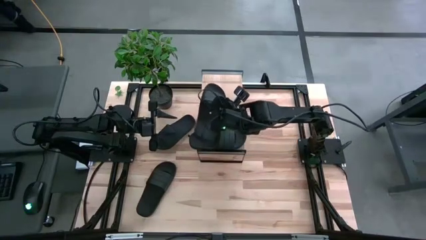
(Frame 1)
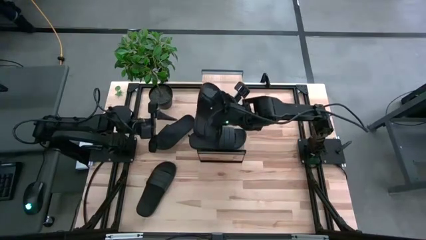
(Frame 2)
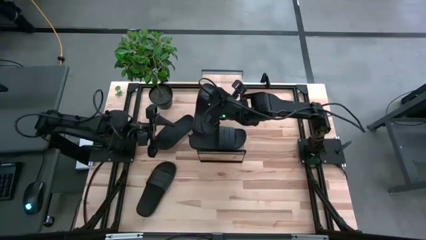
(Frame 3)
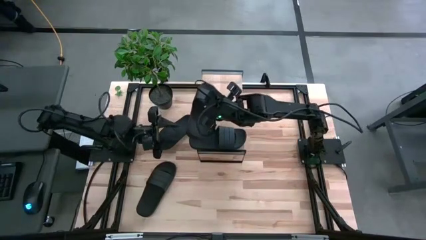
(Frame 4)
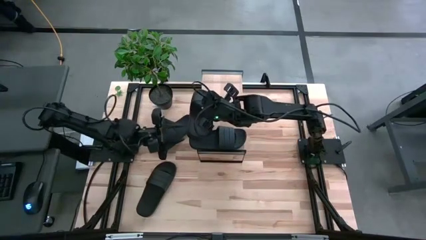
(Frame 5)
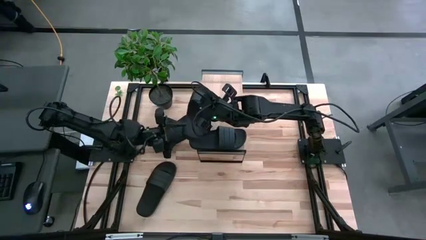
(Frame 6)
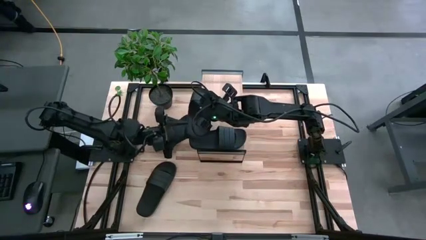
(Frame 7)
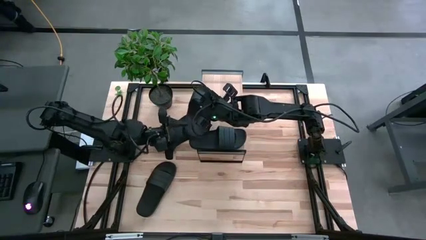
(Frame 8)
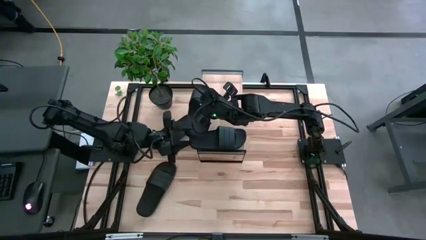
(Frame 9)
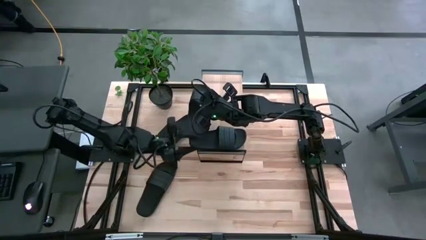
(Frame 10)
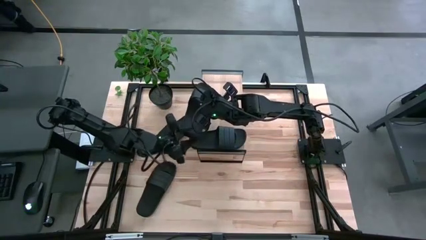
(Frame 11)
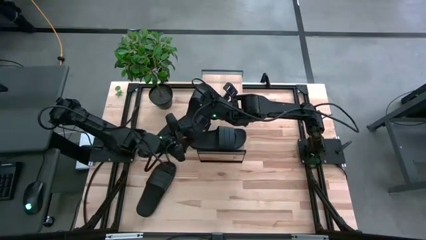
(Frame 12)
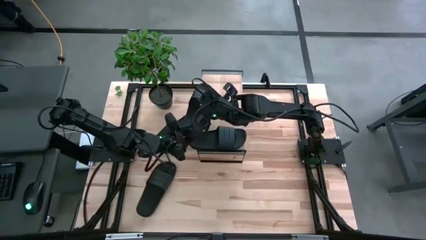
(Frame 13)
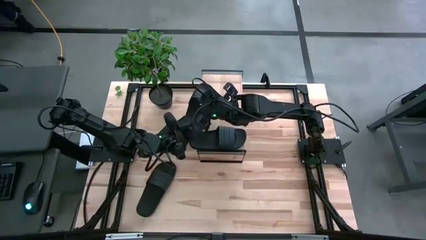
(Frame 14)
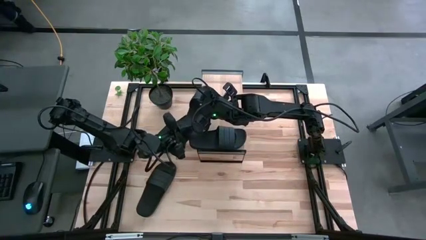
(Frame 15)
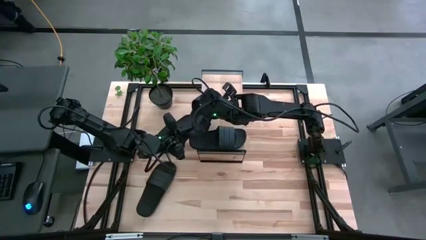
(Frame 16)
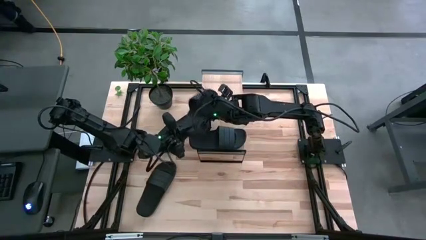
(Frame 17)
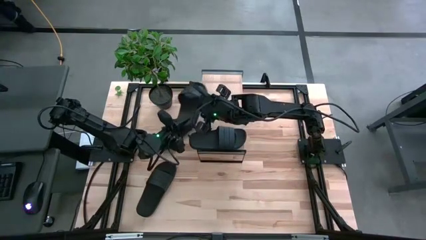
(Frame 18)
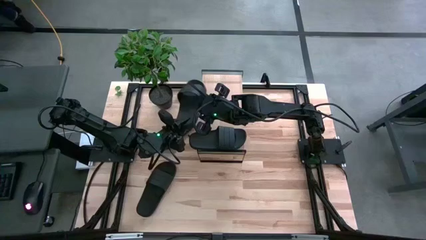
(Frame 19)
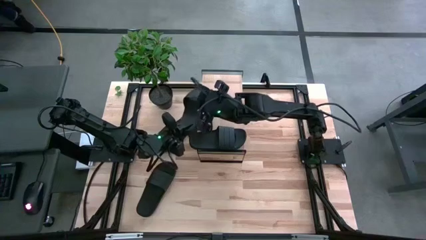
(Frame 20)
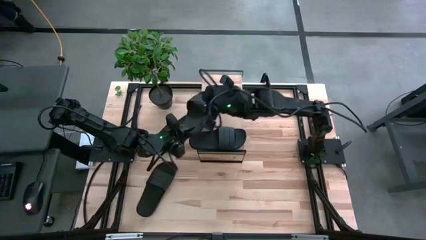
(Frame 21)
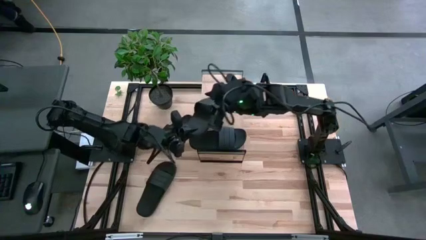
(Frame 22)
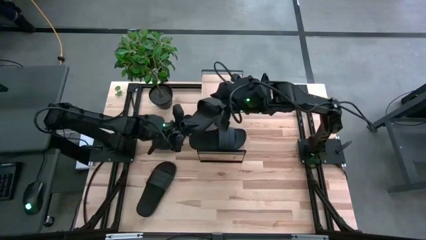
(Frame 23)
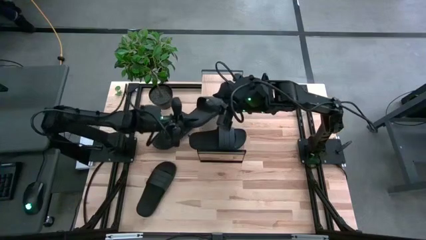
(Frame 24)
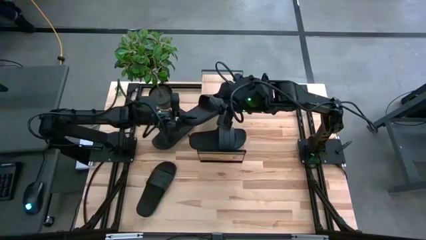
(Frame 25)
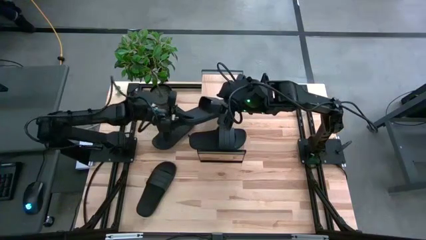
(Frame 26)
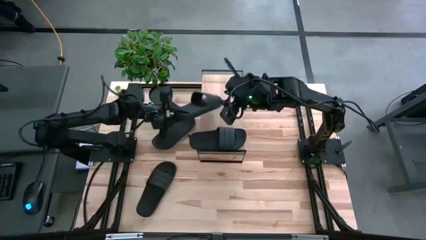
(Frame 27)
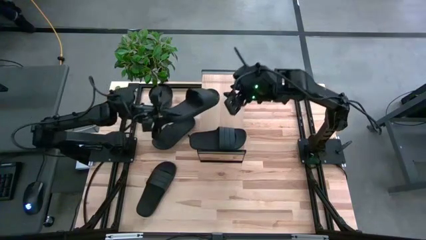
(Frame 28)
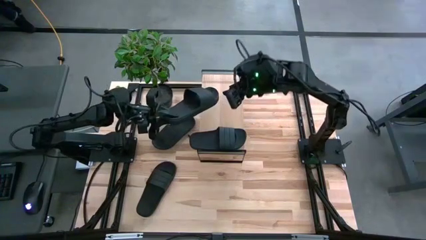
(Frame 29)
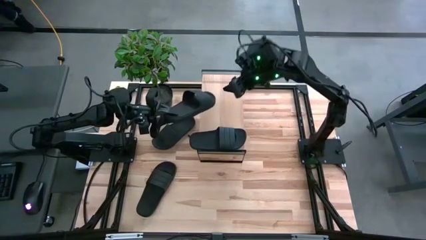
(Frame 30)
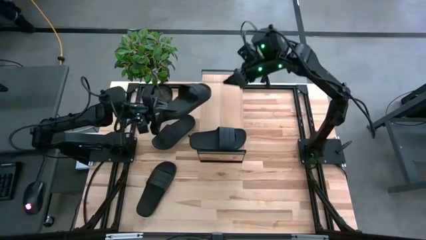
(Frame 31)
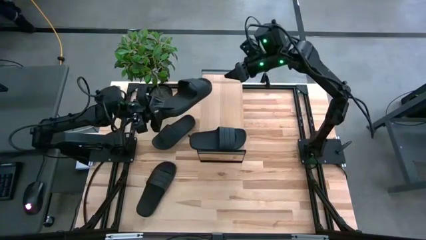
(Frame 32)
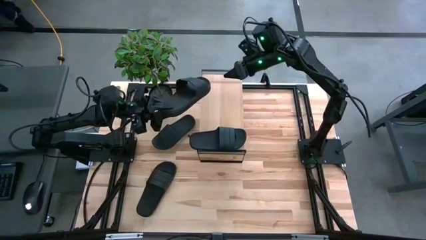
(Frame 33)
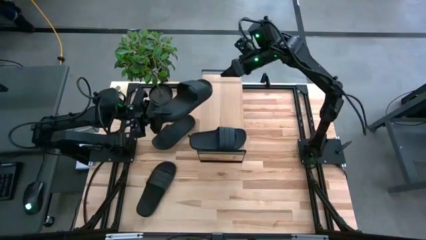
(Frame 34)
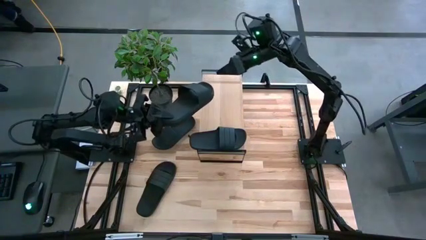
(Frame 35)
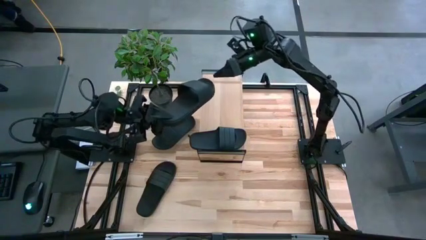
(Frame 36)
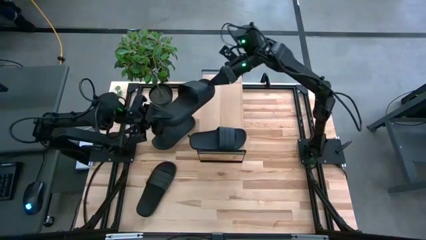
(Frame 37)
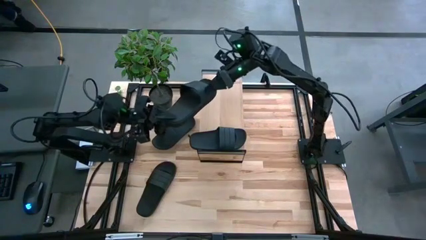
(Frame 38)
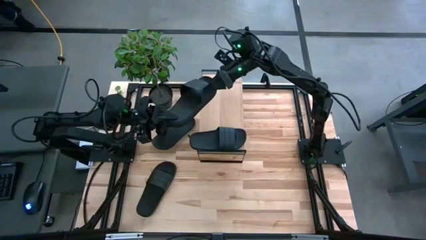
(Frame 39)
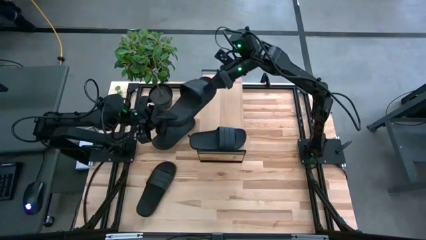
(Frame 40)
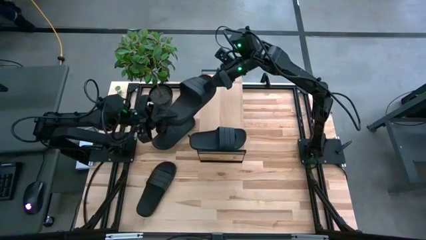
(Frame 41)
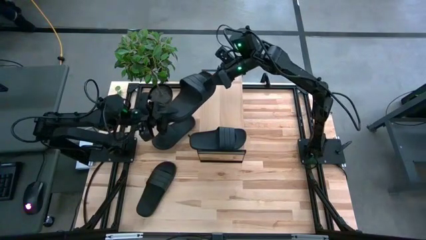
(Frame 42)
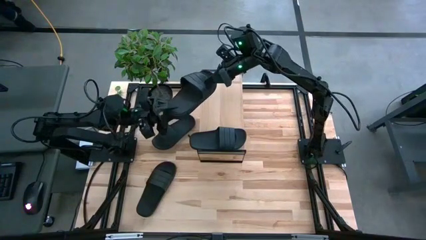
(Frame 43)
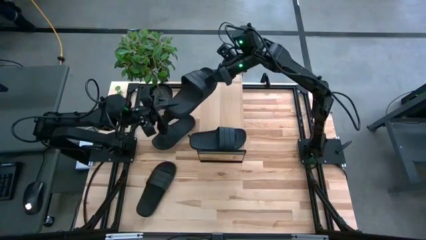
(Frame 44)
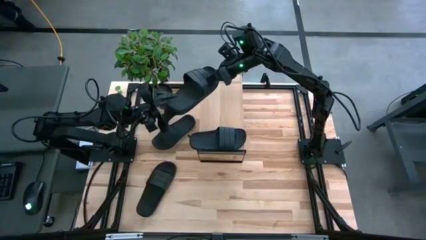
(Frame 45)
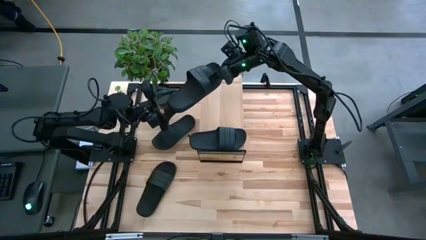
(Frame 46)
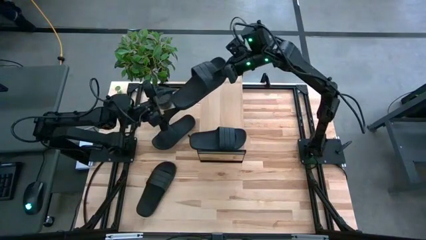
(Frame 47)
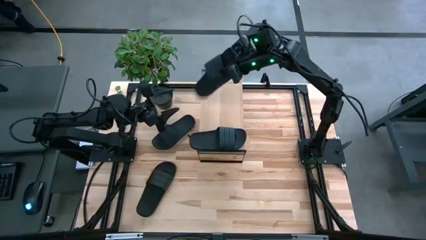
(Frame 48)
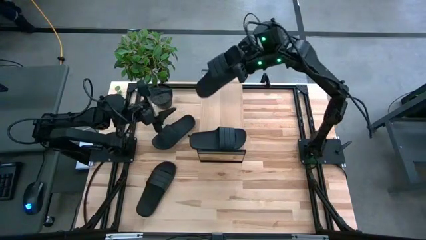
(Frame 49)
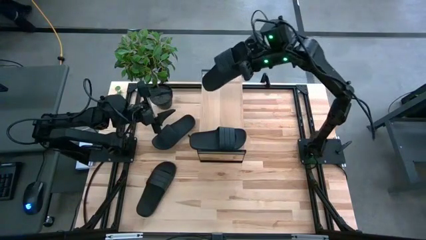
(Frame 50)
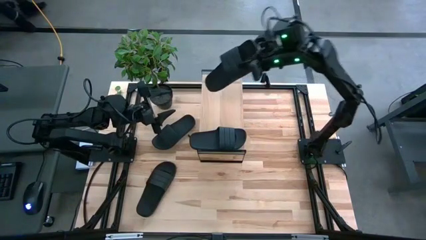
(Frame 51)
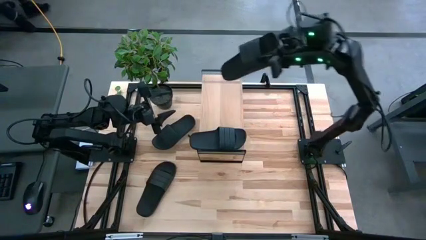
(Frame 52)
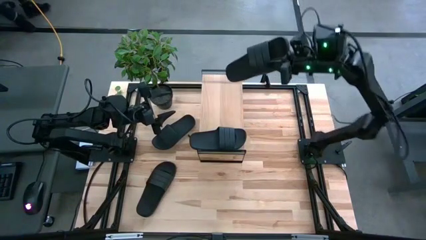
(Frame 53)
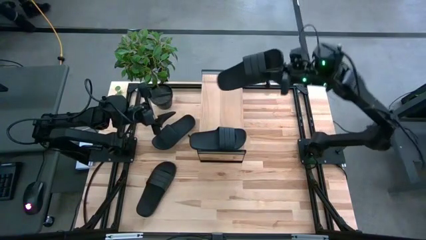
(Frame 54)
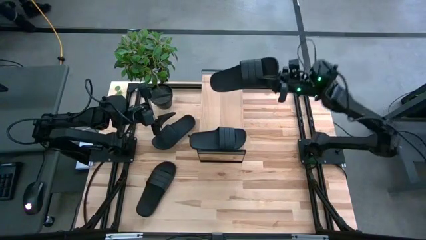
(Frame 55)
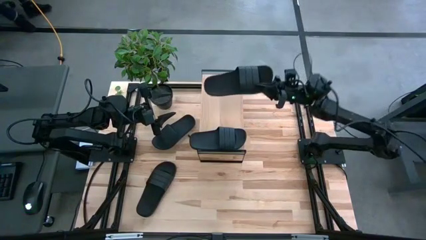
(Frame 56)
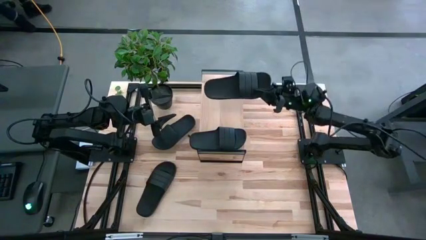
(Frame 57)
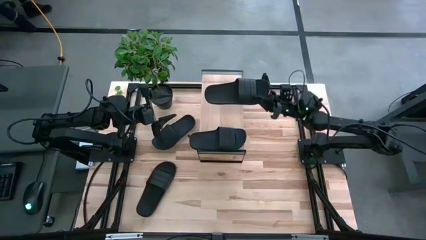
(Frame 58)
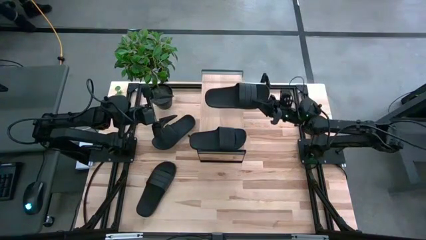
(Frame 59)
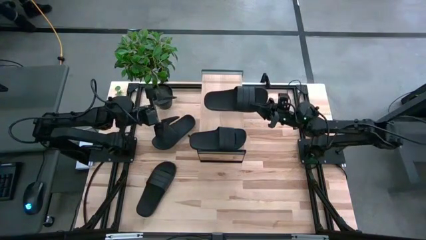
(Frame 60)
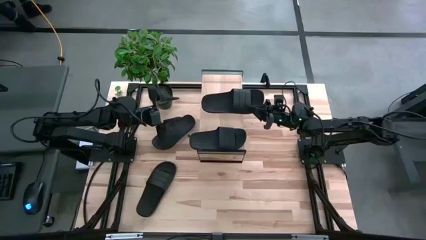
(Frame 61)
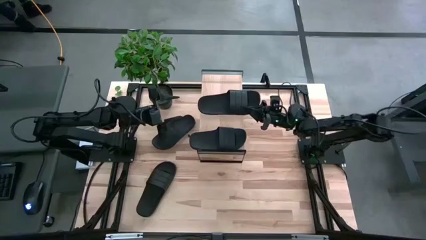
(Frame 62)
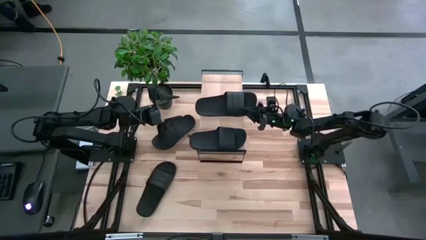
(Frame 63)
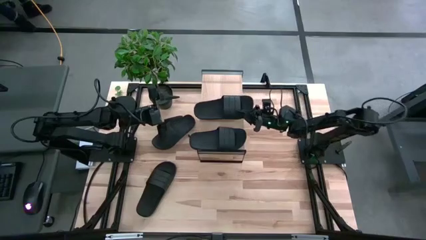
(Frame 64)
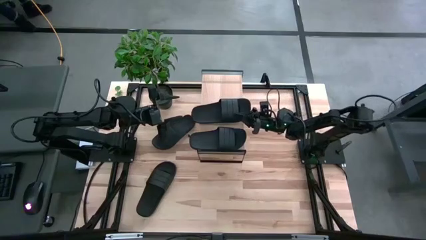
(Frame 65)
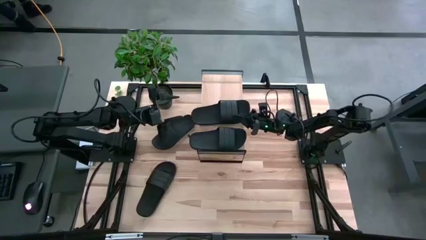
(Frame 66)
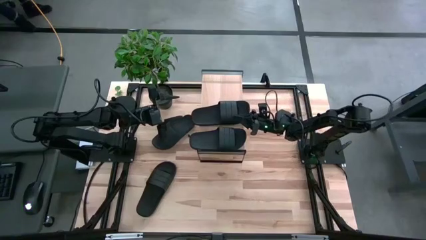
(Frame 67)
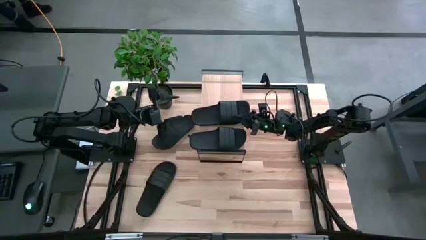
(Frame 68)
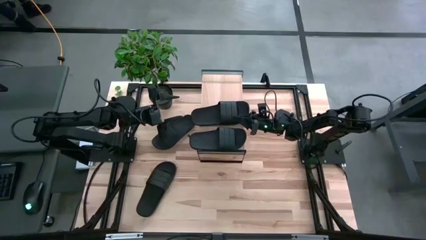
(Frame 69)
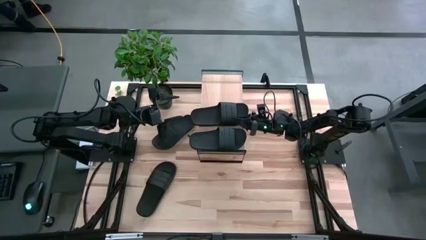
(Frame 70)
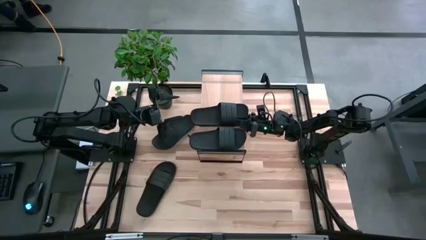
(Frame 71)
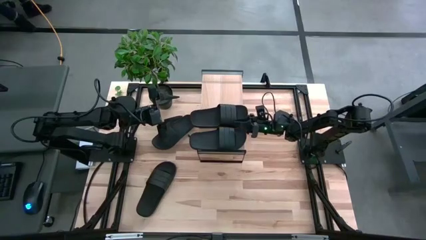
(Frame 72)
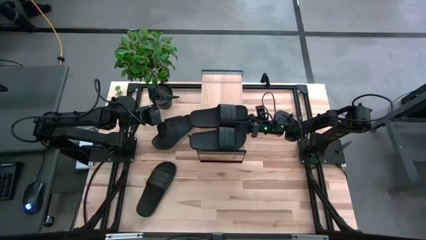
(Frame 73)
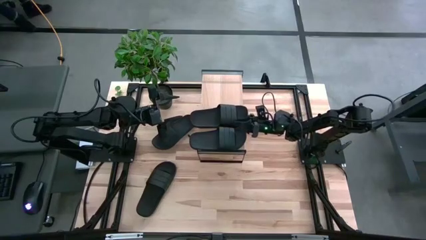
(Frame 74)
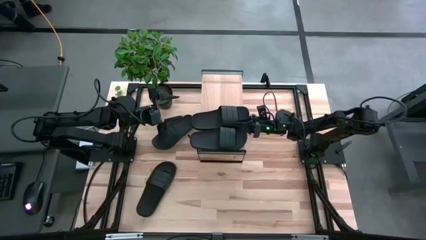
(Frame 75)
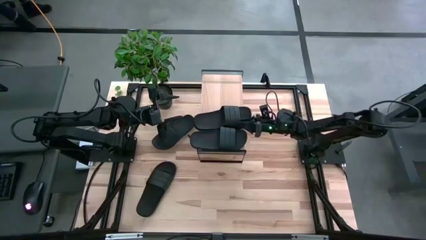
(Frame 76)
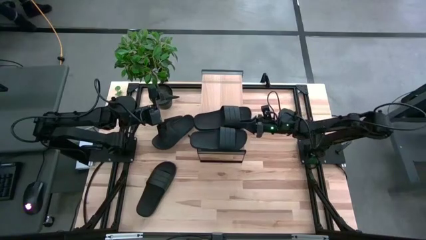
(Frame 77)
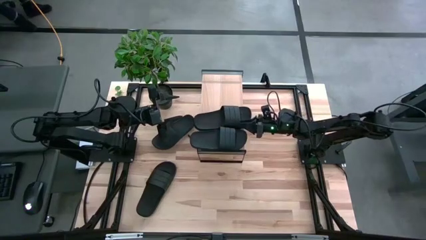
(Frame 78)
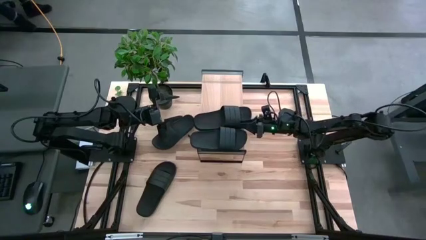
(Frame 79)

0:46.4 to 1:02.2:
Task: Pick and place slides into the shelf
Put the bottom right black slipper on the shelf
